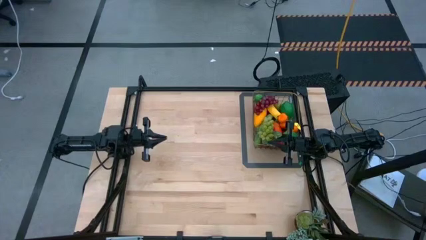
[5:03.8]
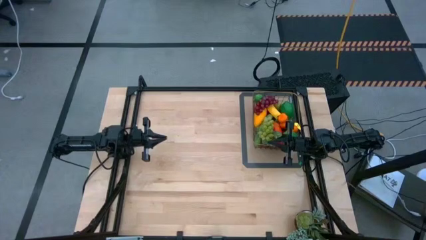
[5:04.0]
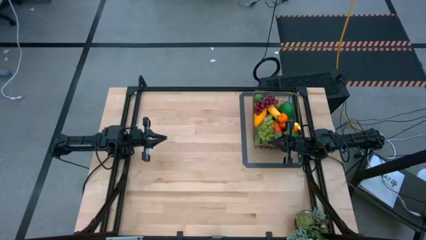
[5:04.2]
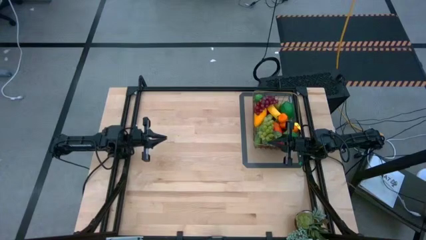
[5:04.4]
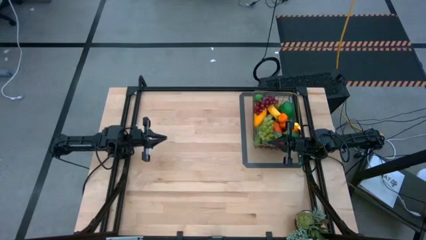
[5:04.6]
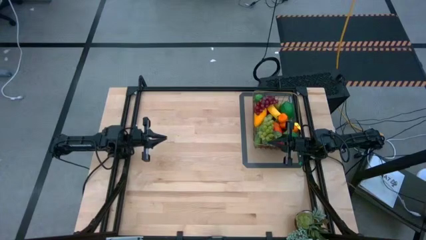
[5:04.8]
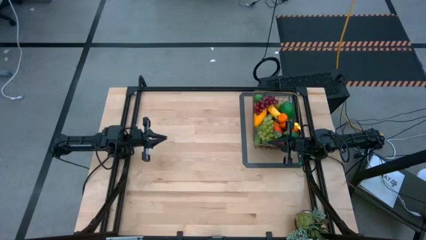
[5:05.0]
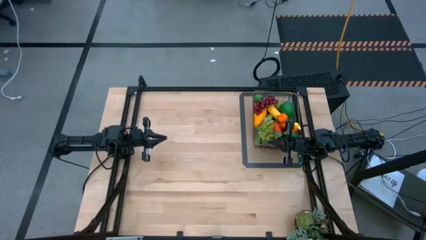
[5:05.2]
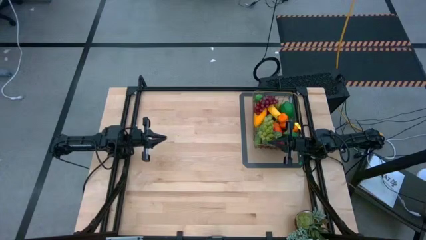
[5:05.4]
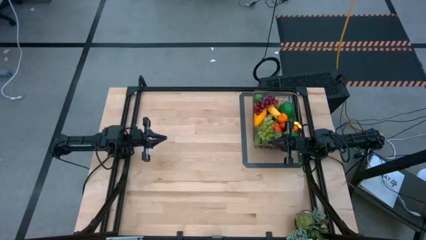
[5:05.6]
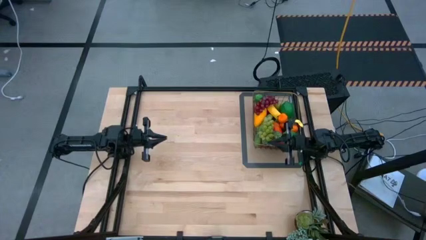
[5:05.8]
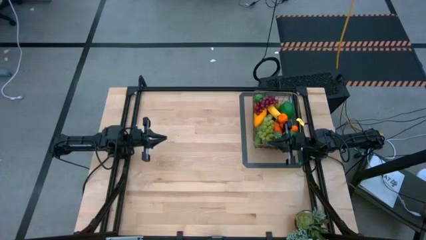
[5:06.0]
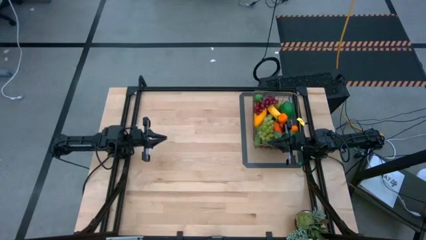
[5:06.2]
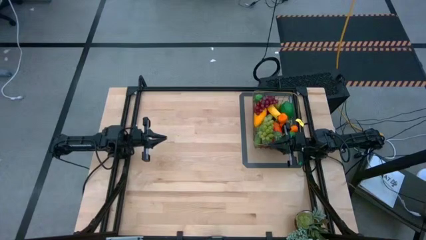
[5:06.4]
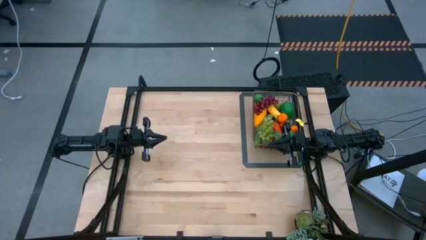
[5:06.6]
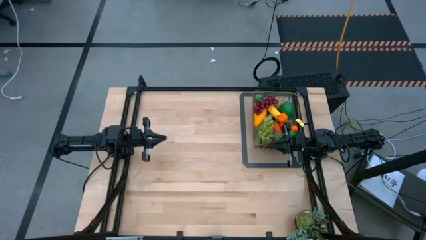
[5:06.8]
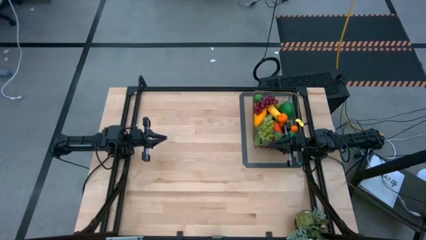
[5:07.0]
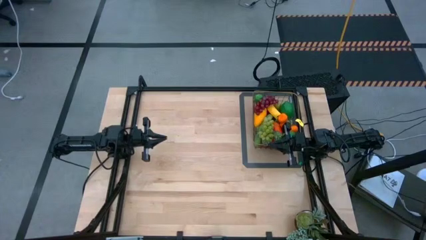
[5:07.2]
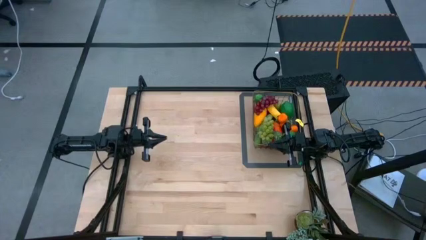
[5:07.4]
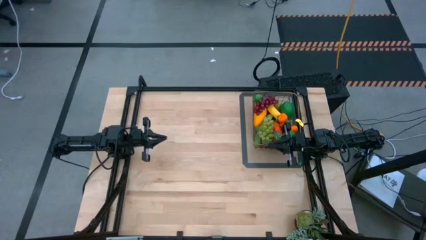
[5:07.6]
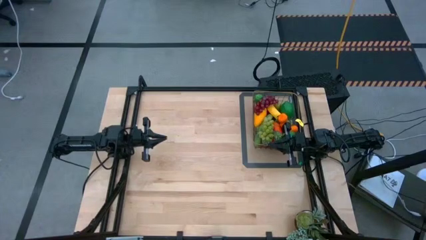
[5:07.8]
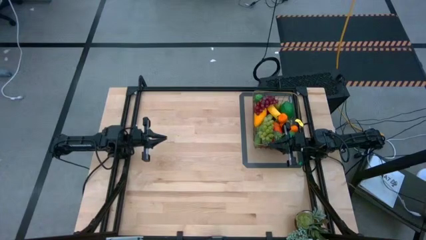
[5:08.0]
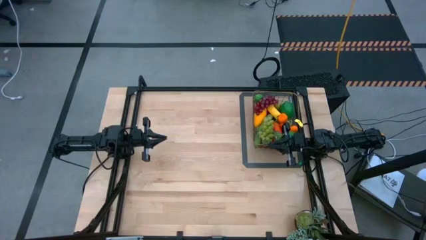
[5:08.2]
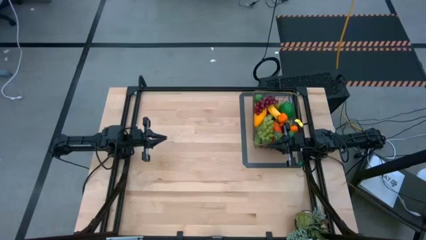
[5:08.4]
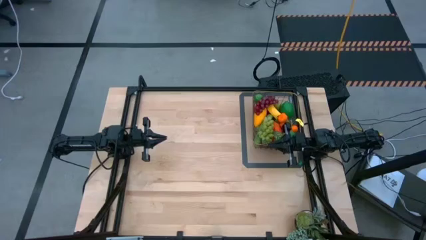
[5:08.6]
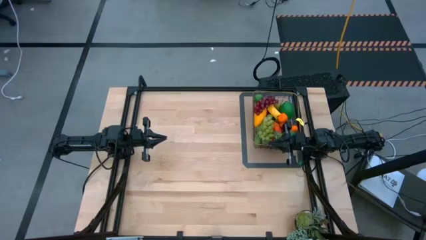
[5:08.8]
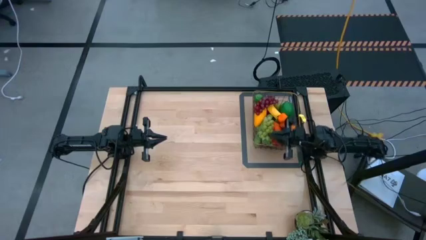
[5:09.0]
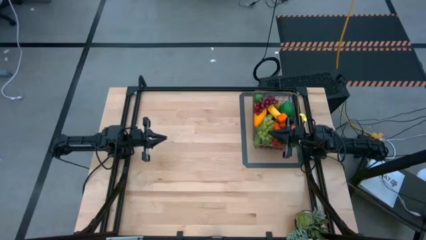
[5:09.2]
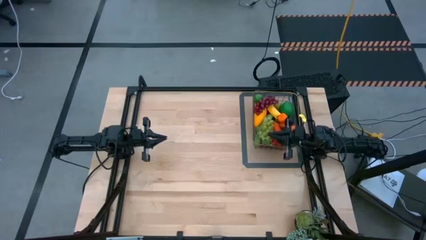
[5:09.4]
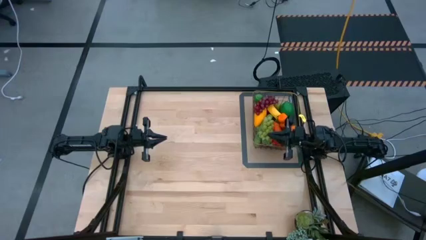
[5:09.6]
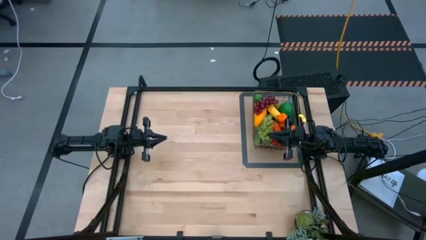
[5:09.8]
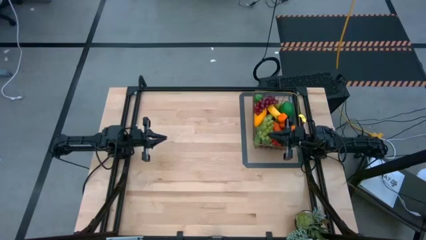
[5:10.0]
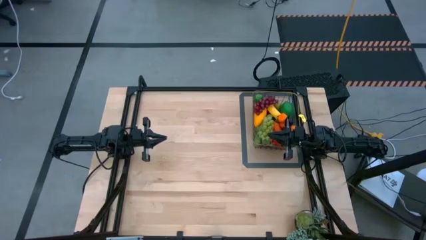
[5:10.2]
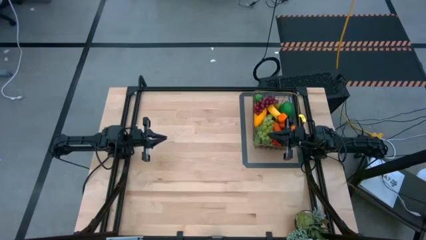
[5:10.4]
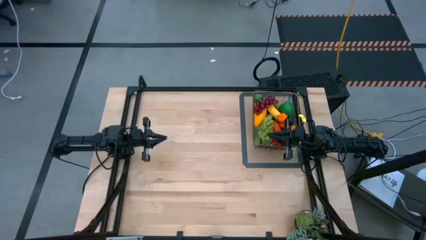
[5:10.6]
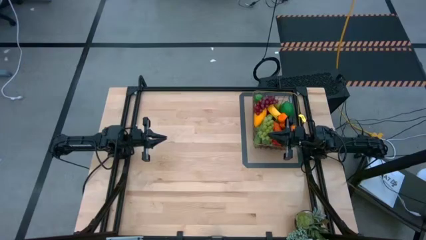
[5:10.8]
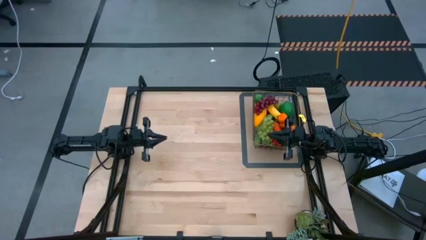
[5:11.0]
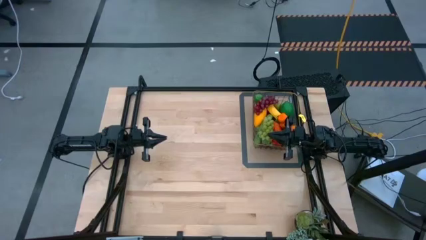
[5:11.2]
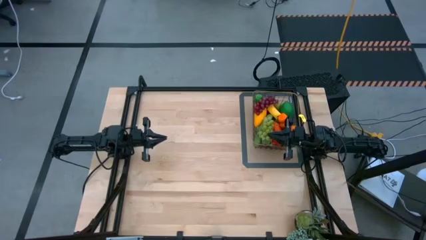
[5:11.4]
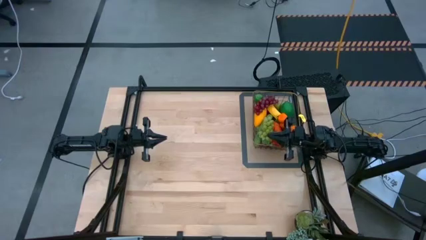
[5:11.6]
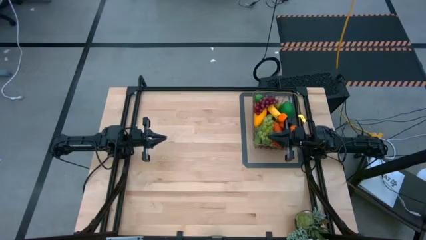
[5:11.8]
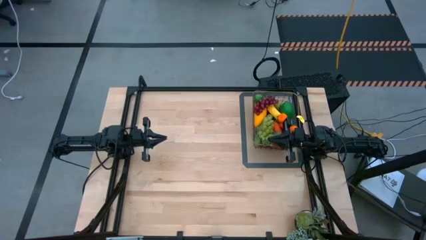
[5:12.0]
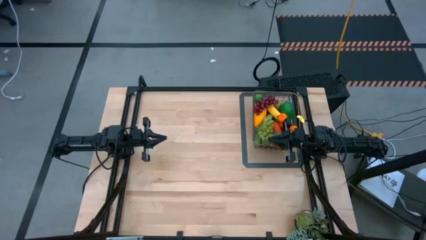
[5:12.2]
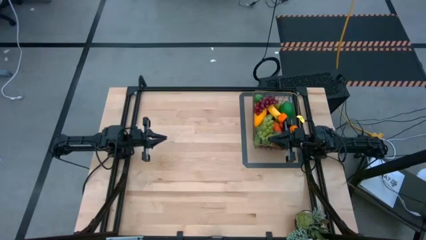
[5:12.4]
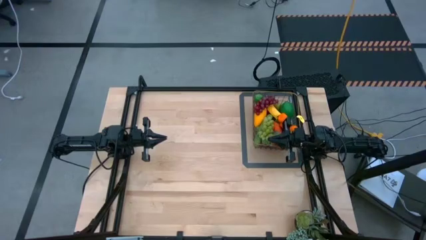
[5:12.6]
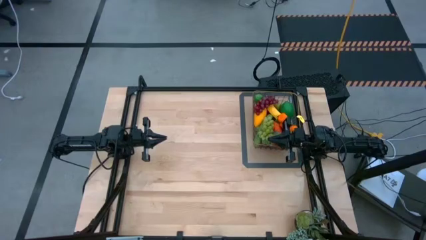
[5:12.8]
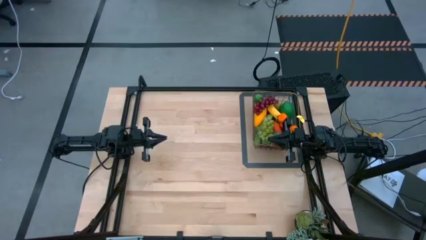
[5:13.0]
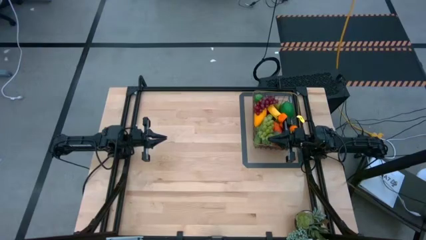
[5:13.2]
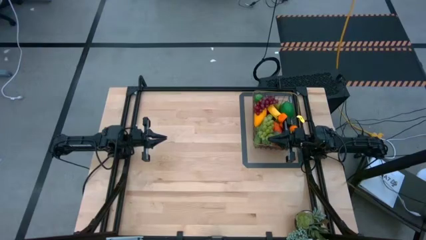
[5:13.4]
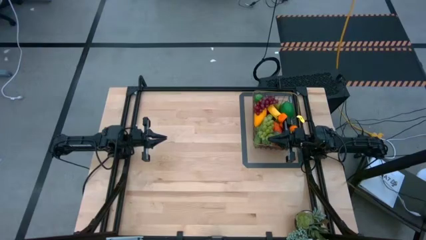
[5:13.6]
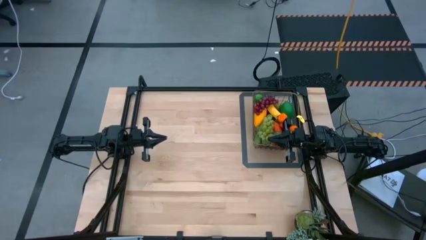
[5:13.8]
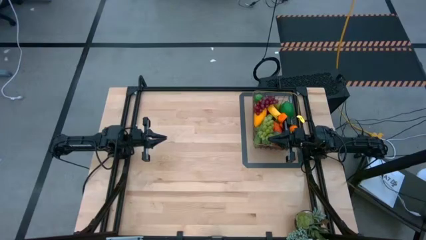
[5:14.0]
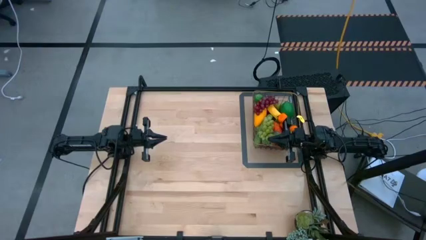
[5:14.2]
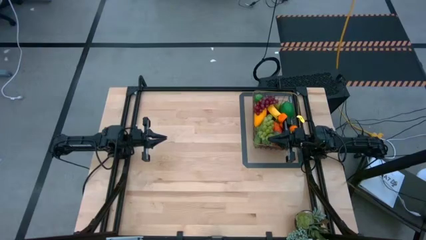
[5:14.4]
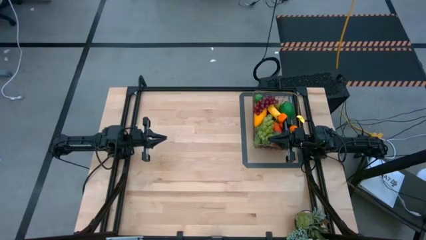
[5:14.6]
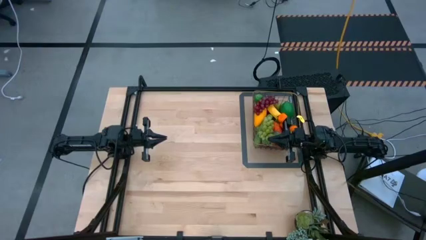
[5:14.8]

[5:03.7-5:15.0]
Task: Build produce basket
Return to Home Position

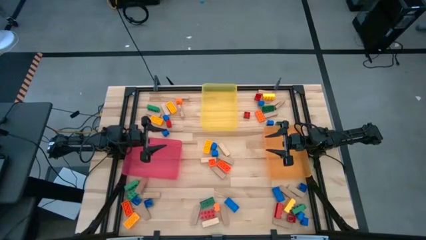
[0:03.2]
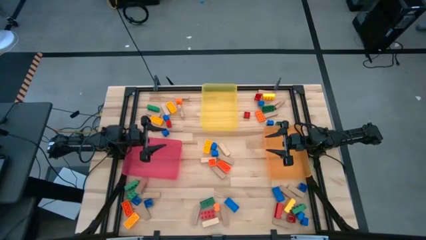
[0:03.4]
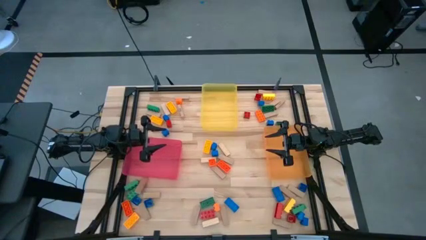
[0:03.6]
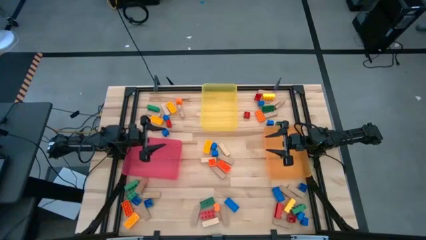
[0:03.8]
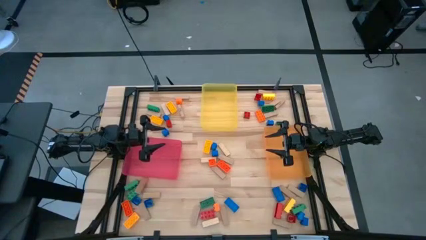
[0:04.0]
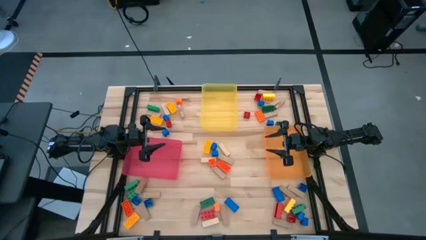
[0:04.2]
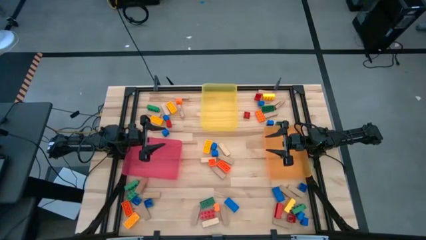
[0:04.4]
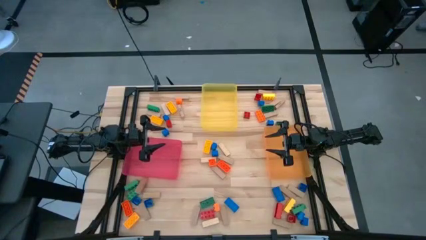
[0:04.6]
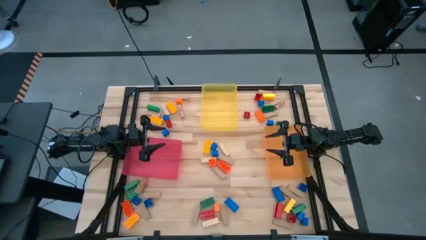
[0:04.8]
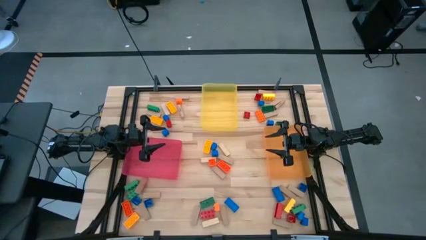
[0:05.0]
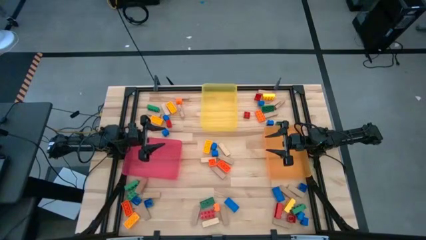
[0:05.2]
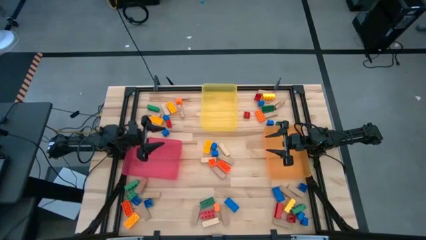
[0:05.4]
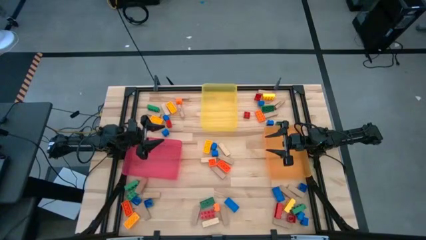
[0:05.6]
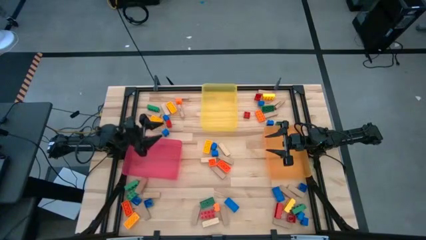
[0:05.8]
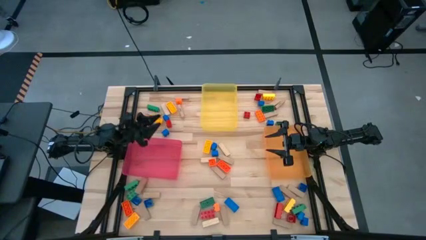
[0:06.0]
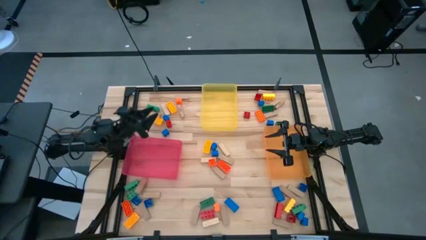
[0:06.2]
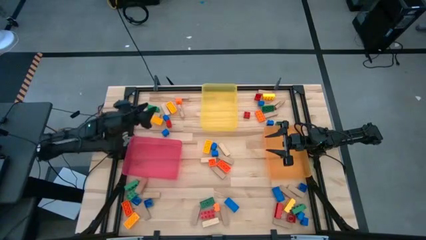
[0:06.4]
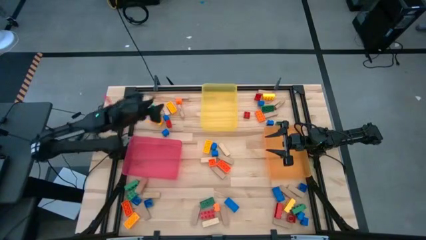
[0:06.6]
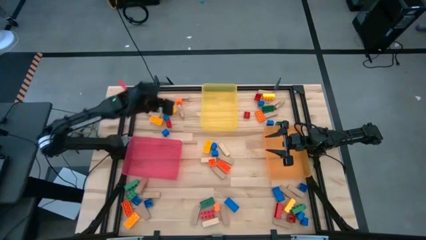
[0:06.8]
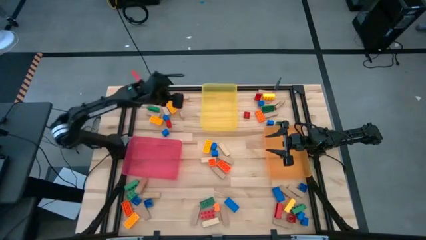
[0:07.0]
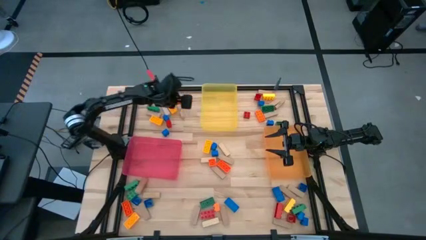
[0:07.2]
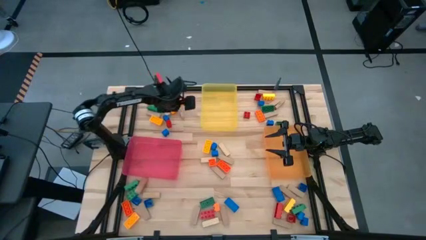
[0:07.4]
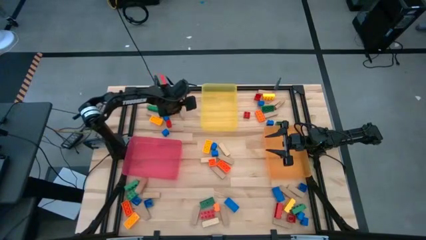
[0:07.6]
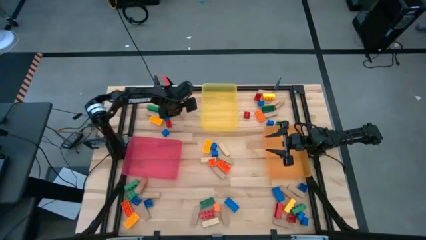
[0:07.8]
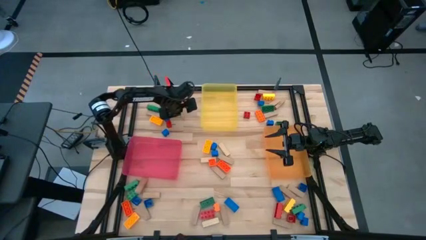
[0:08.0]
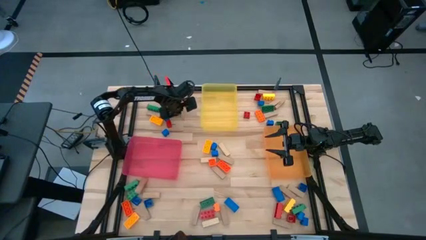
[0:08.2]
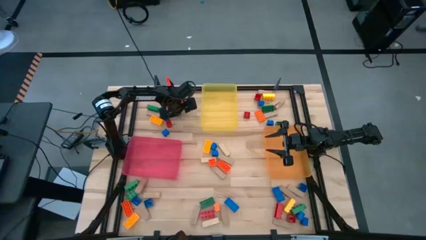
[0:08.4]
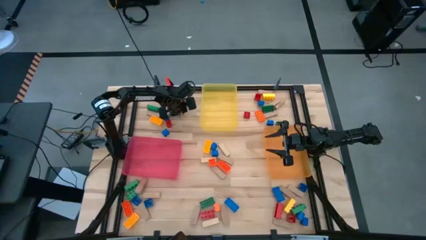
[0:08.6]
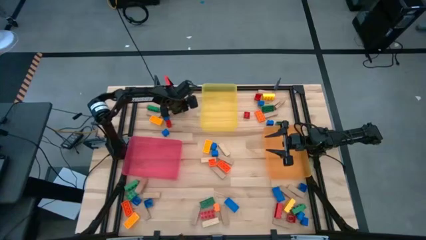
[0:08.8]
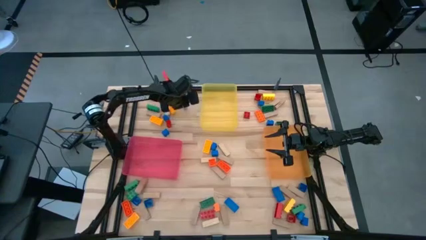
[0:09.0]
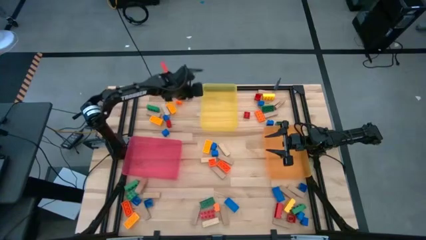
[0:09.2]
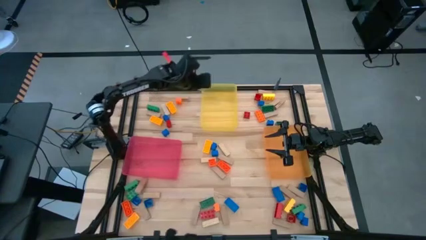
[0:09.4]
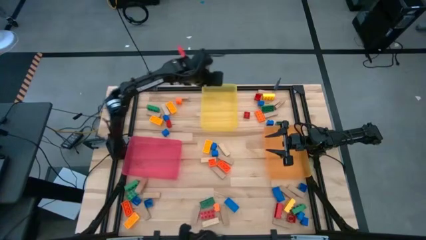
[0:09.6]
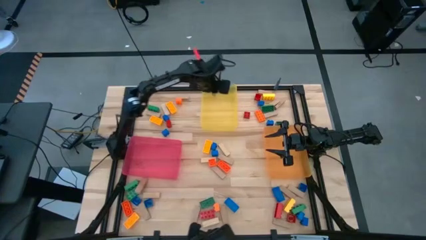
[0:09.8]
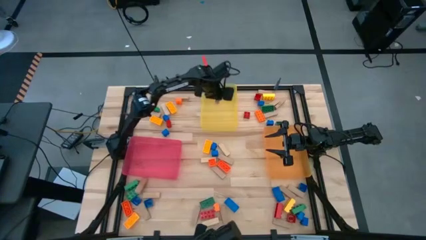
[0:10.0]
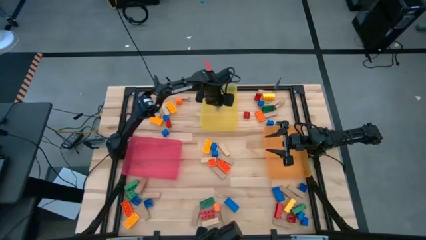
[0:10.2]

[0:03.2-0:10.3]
Task: Sort blocks by size
Put the wooden block into the yellow bin
